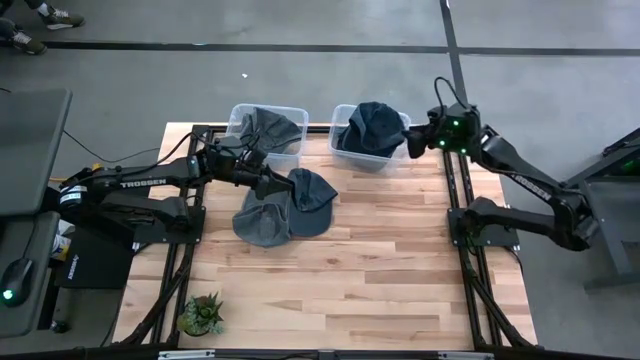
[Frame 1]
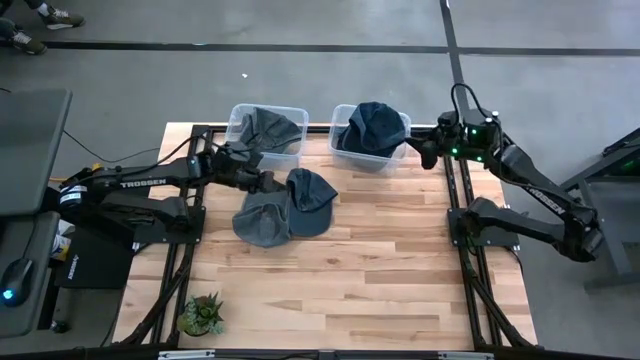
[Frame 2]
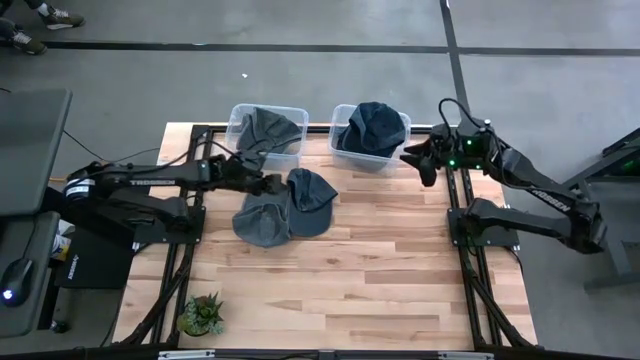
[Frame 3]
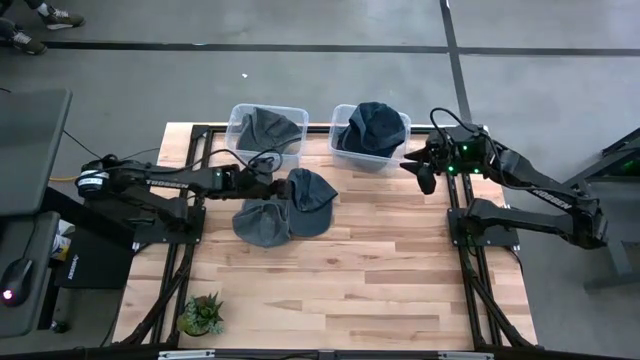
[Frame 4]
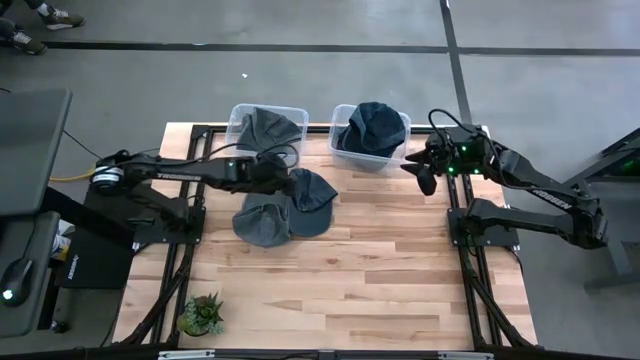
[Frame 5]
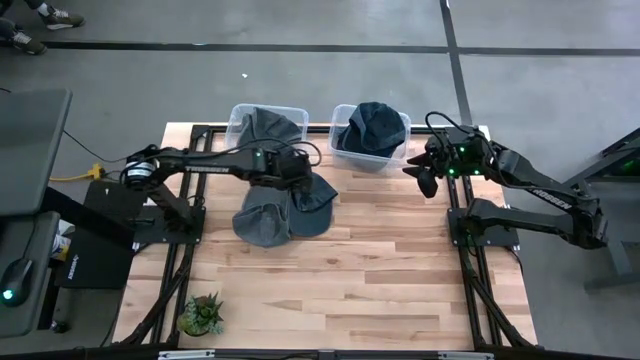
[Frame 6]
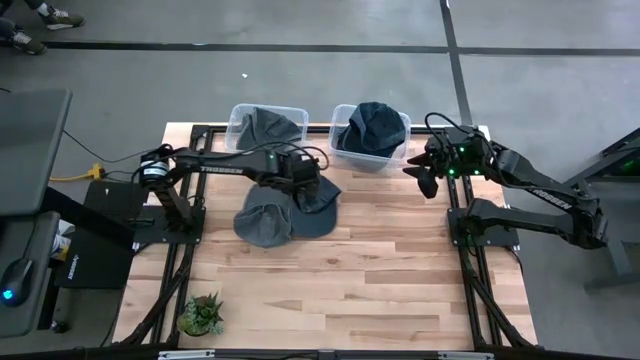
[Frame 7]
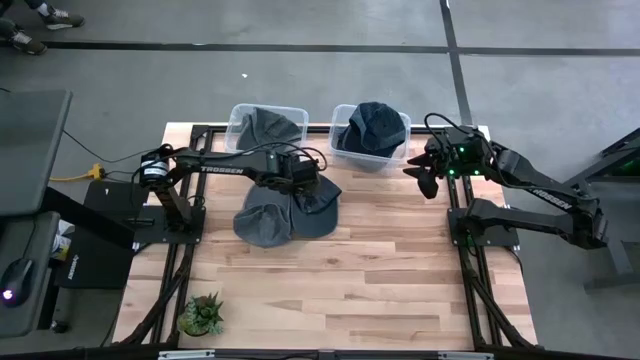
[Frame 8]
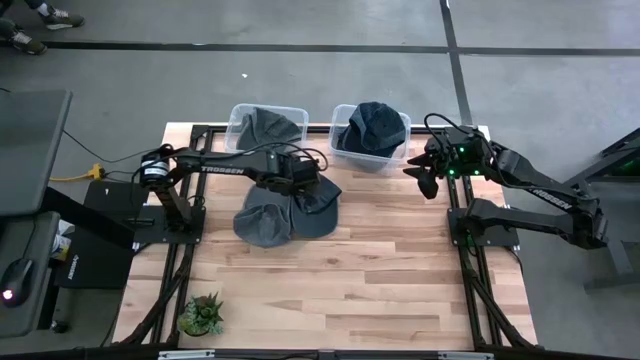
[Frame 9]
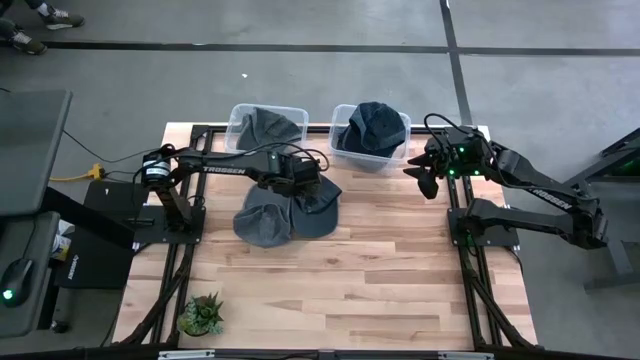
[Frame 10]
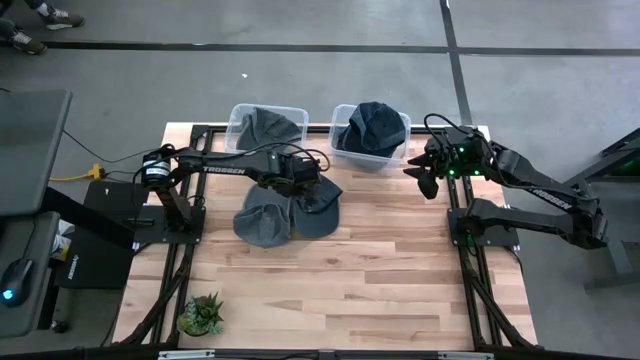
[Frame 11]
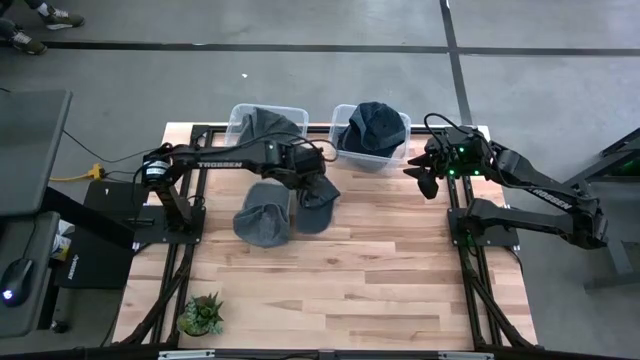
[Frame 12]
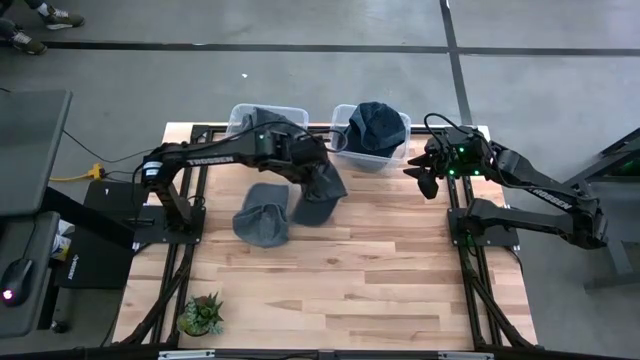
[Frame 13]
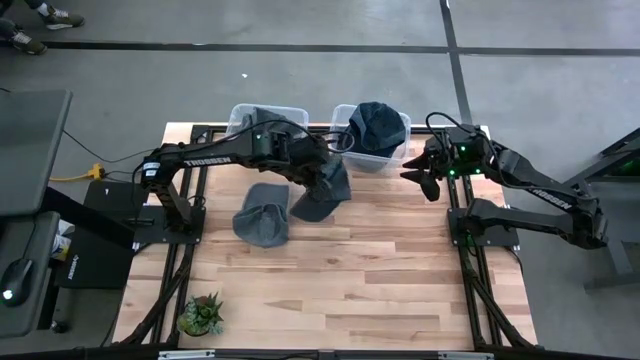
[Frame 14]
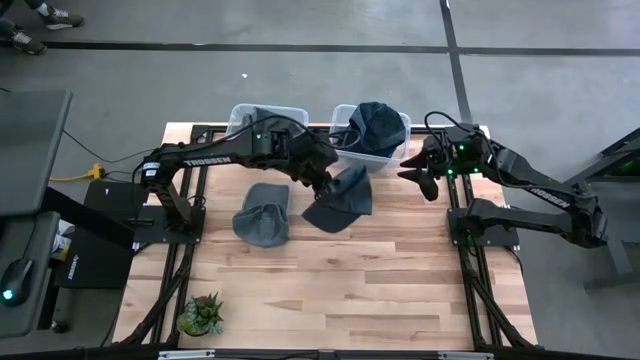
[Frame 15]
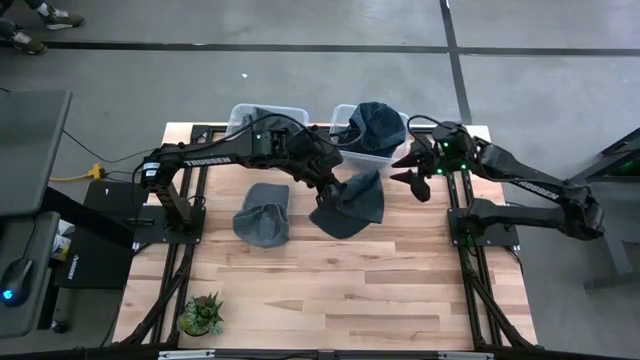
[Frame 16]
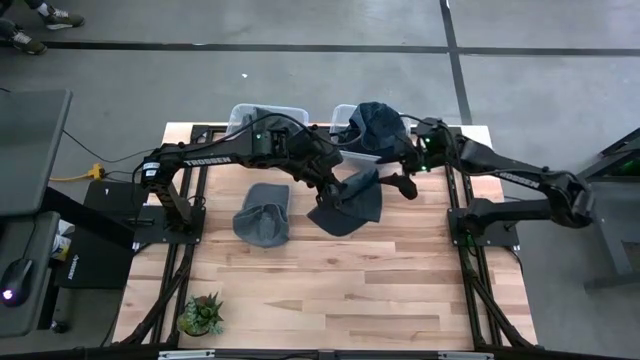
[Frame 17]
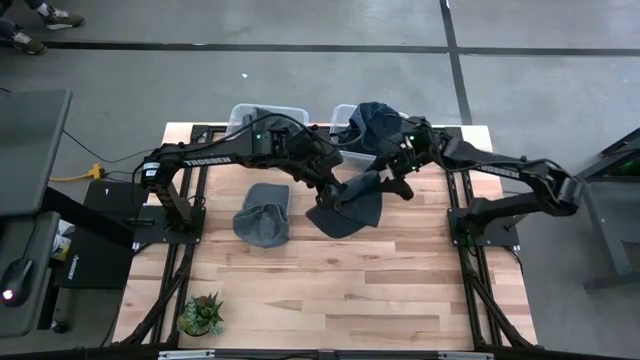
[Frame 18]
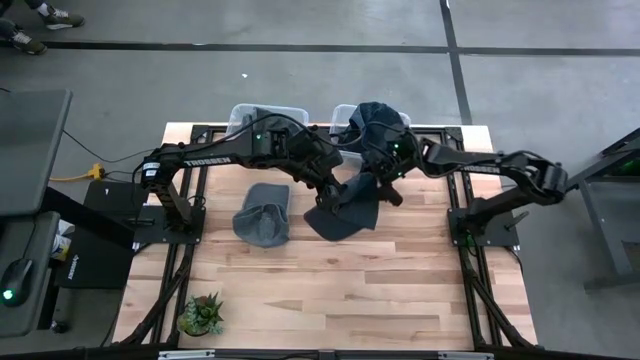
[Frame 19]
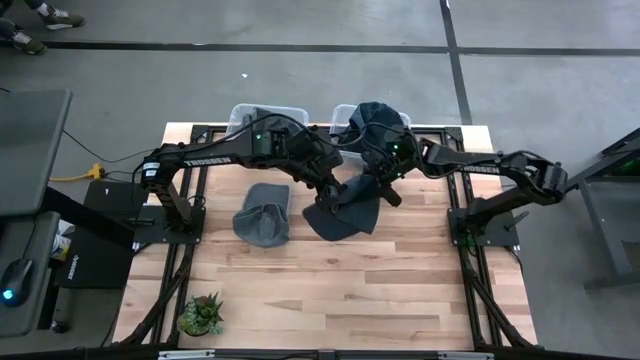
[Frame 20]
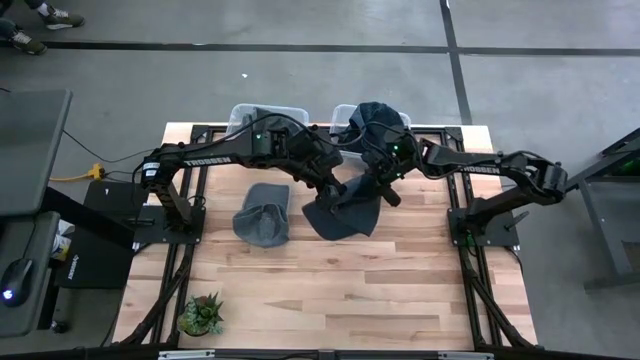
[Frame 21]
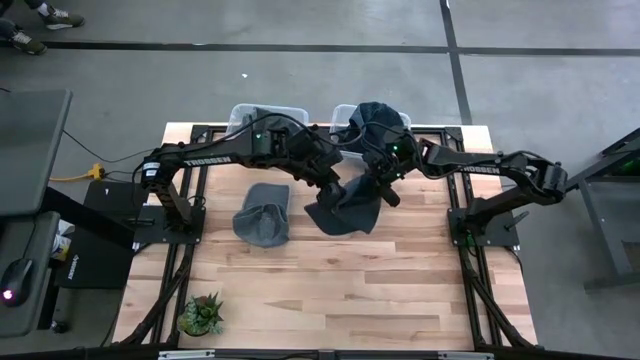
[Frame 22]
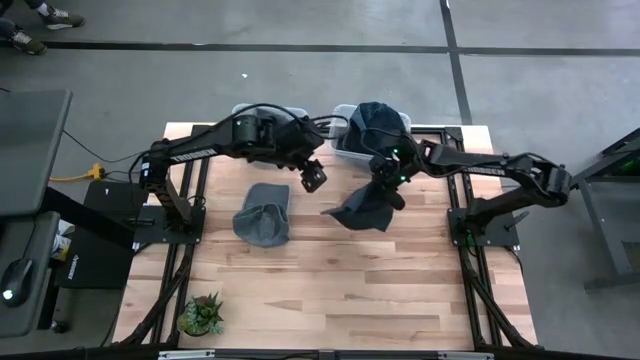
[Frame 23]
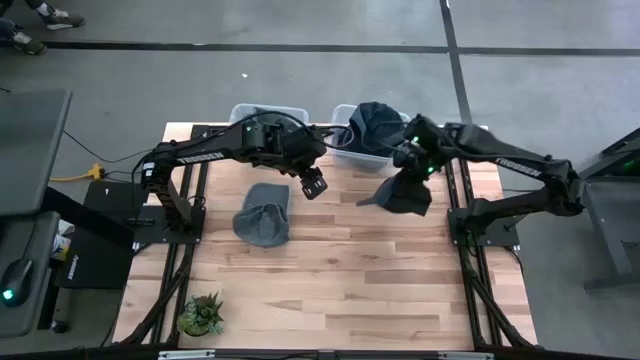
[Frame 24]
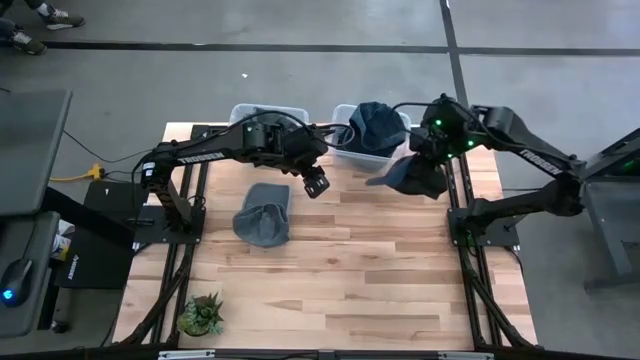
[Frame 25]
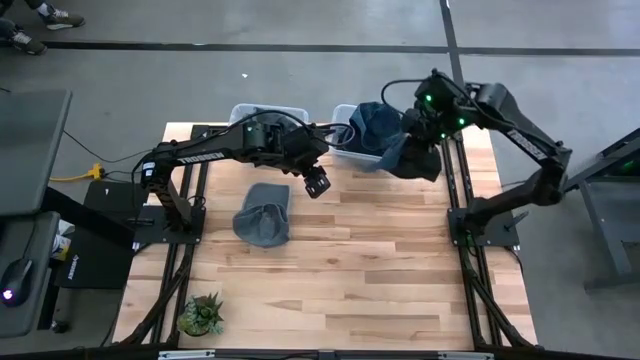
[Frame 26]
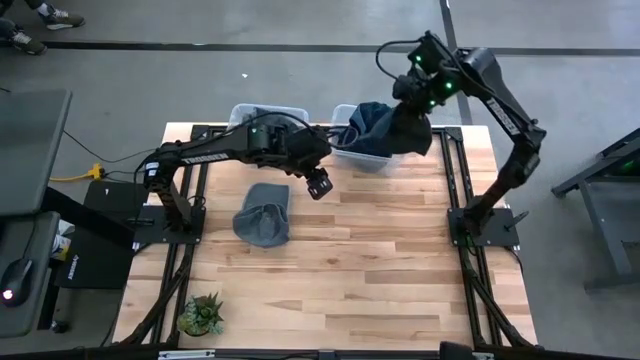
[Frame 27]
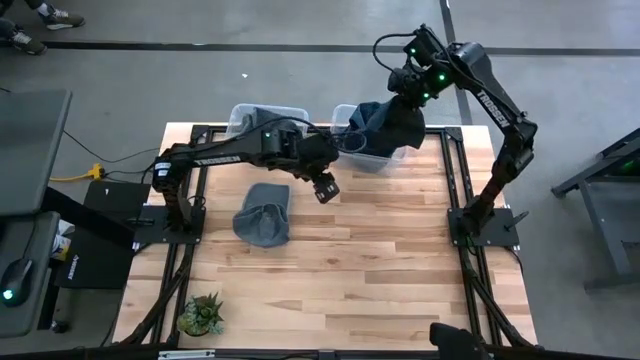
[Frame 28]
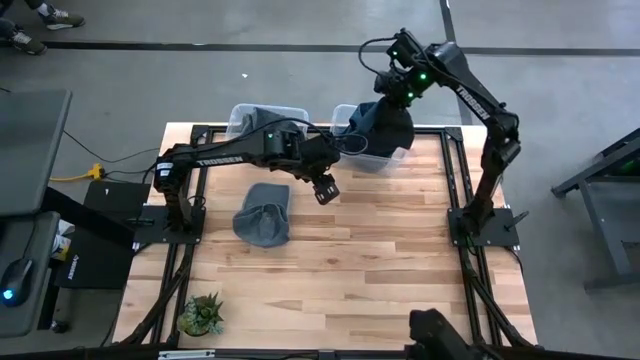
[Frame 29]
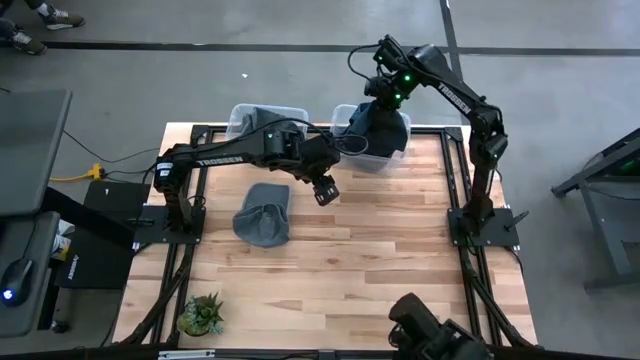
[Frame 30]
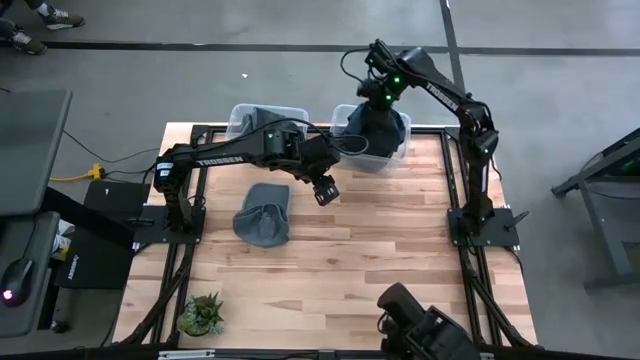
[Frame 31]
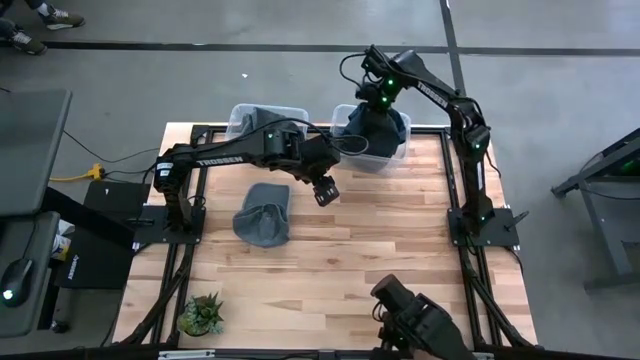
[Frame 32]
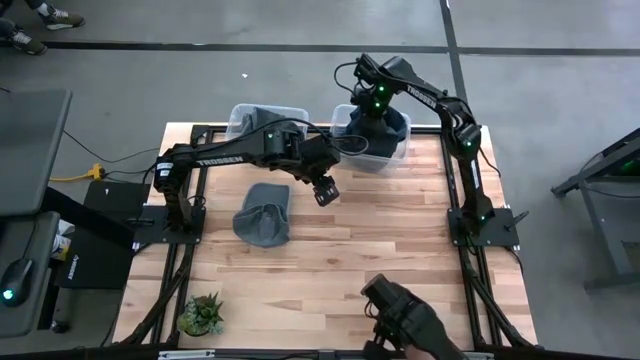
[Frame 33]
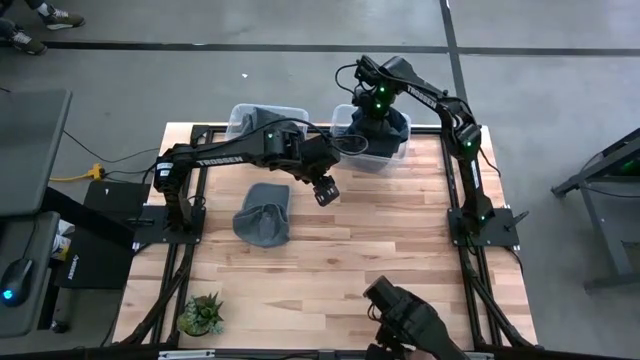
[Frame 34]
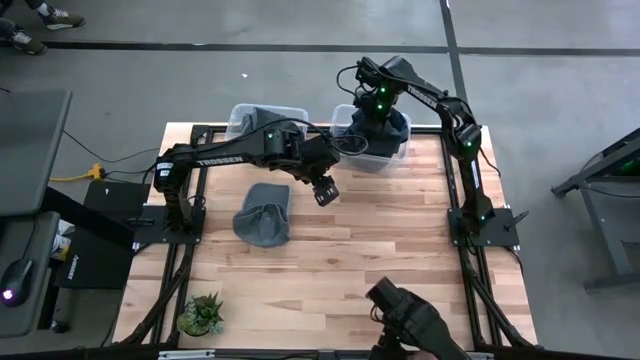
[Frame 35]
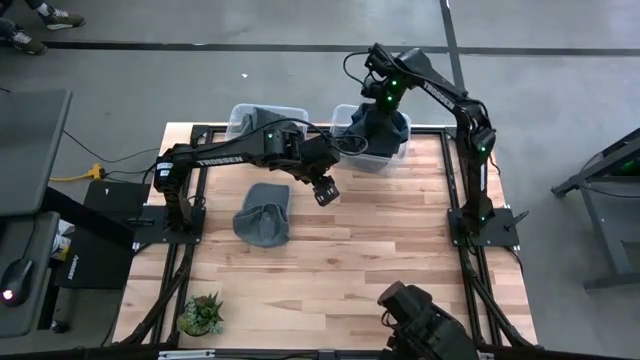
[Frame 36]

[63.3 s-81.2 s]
Task: Pick & Place hat
Put the black cap into the right transparent bin

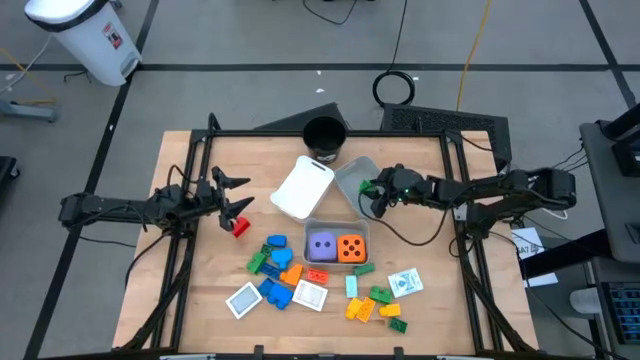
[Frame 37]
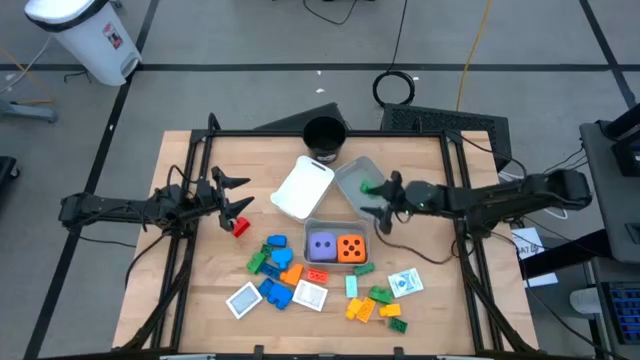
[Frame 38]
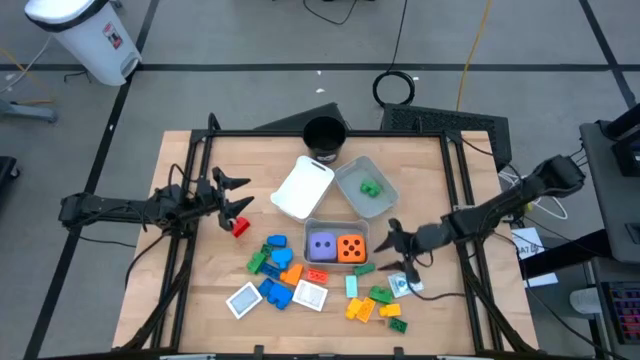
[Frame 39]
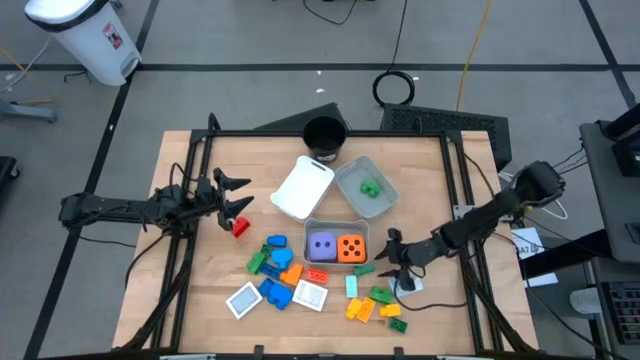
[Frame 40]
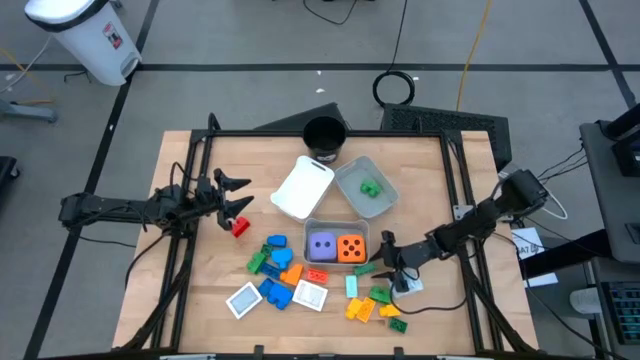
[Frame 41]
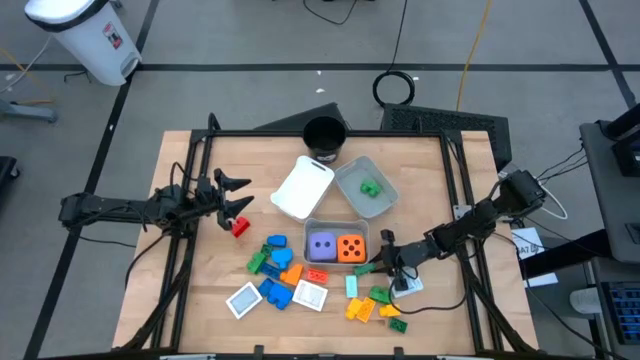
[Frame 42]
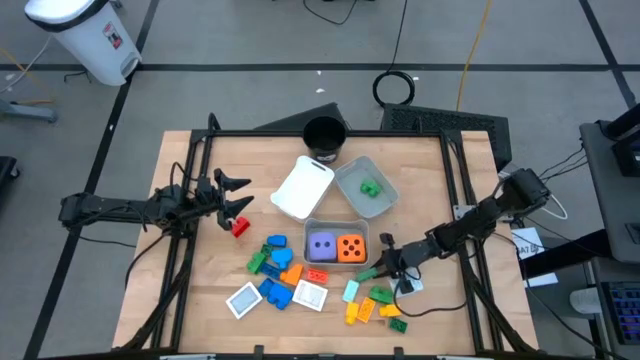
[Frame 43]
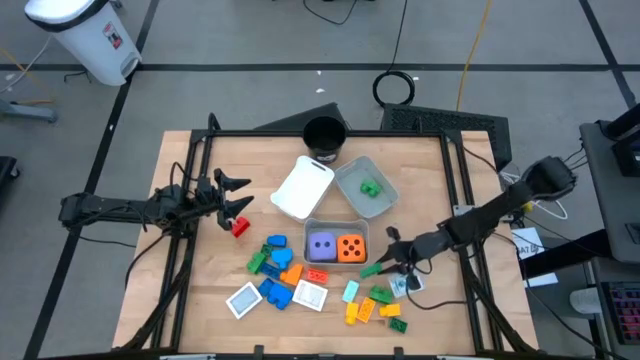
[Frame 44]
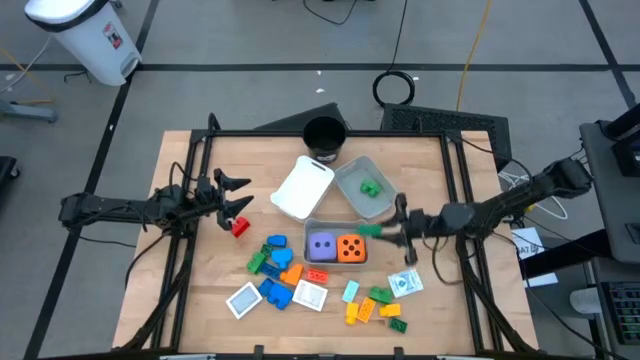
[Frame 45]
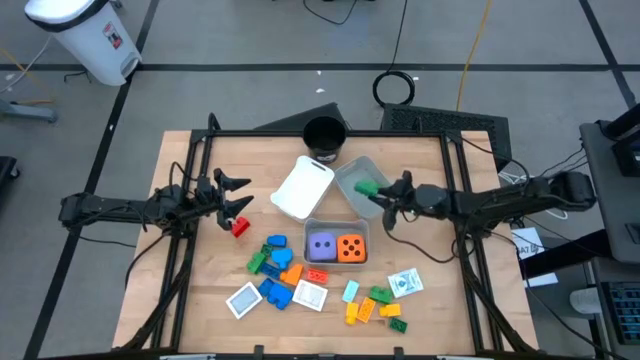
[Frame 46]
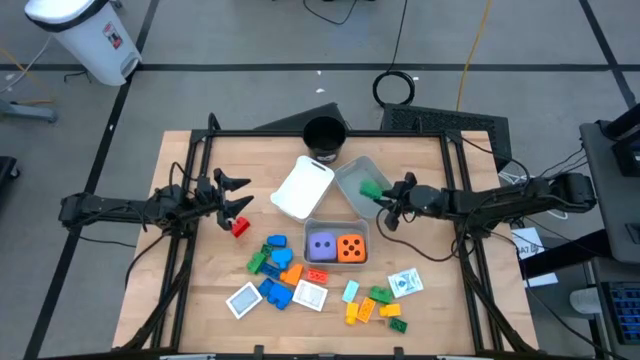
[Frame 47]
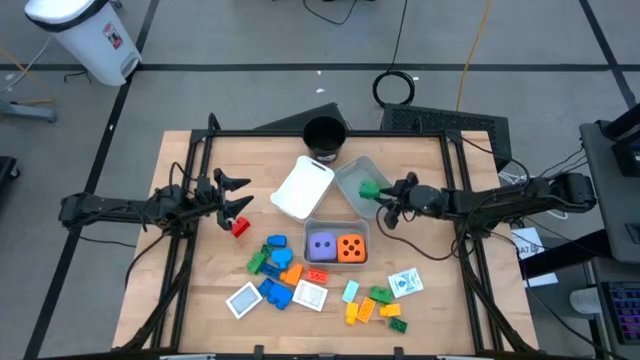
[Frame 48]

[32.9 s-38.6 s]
Task: Pick & Place Toys
Put the green game piece into the top gray bin
